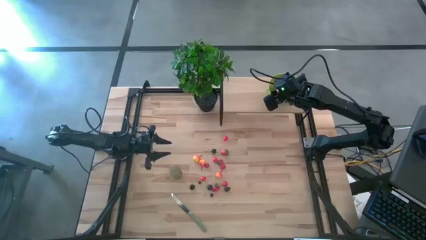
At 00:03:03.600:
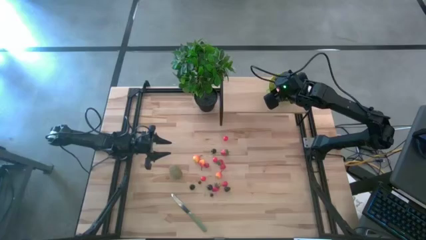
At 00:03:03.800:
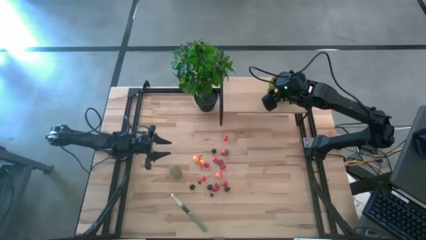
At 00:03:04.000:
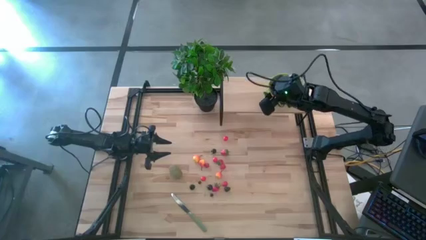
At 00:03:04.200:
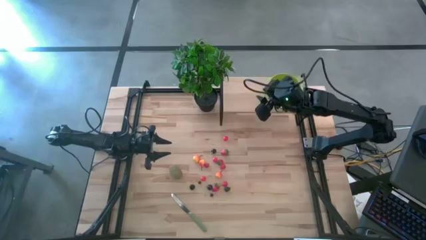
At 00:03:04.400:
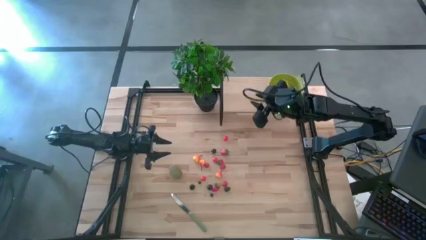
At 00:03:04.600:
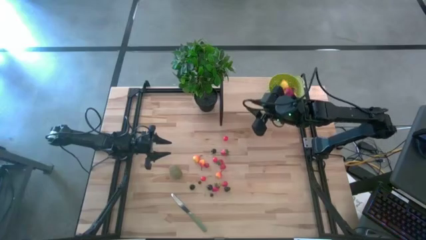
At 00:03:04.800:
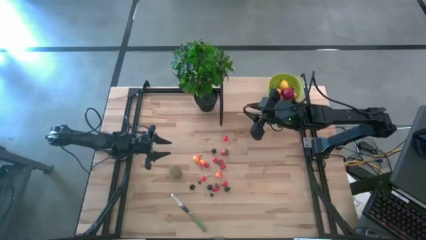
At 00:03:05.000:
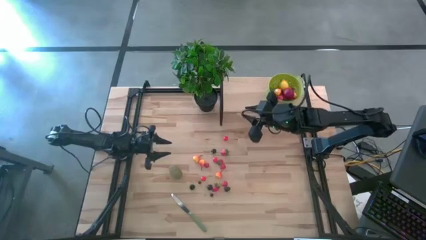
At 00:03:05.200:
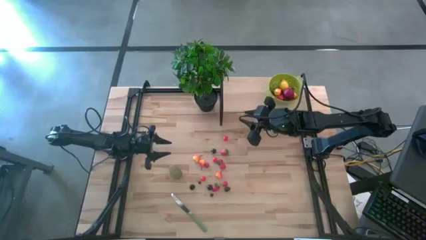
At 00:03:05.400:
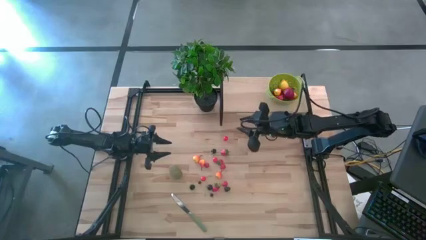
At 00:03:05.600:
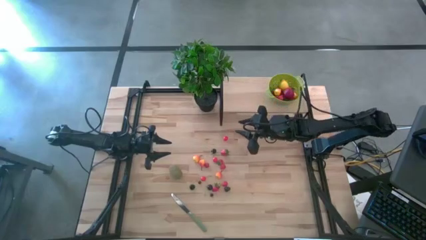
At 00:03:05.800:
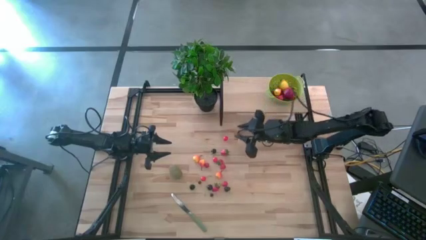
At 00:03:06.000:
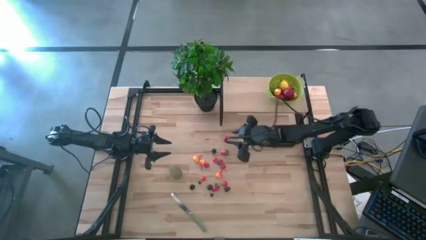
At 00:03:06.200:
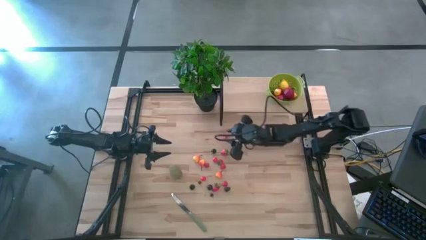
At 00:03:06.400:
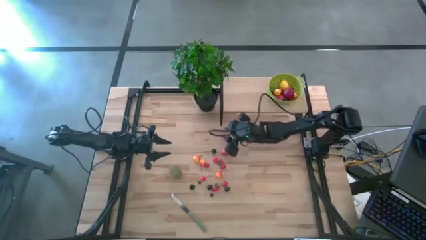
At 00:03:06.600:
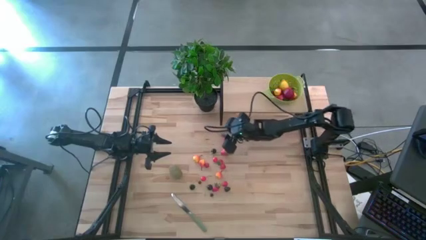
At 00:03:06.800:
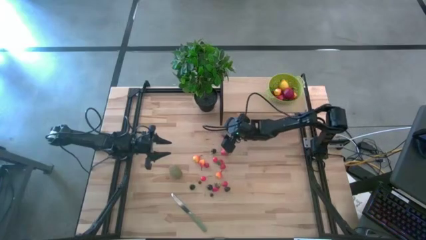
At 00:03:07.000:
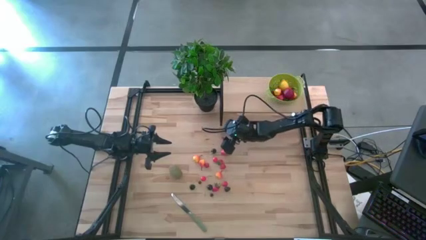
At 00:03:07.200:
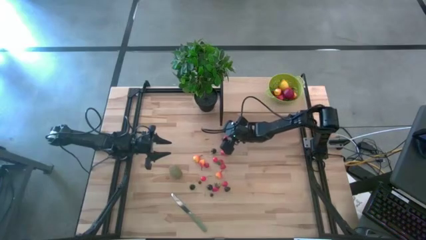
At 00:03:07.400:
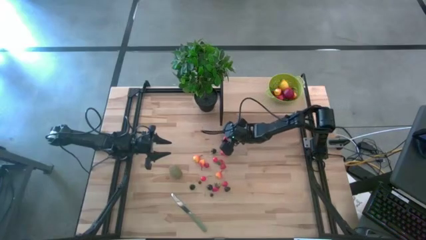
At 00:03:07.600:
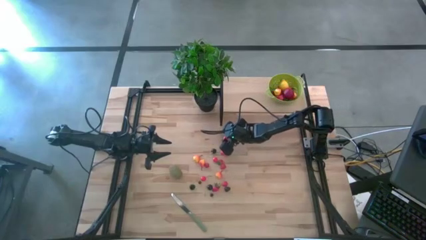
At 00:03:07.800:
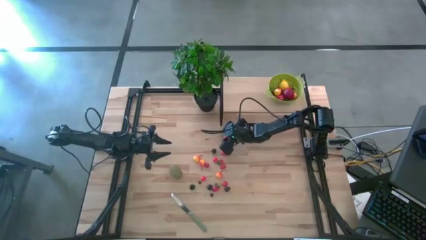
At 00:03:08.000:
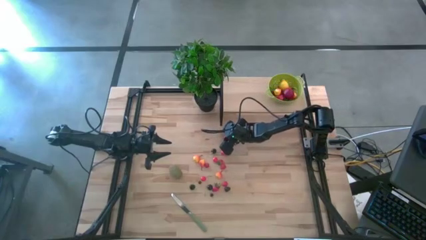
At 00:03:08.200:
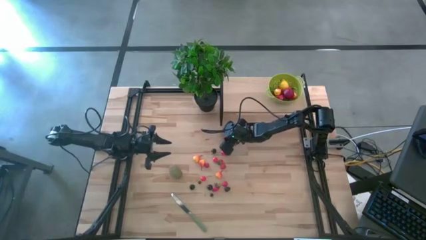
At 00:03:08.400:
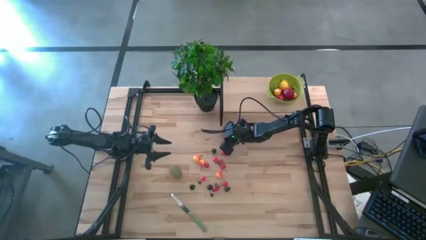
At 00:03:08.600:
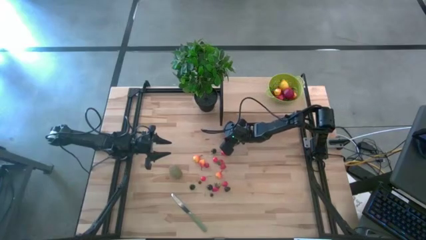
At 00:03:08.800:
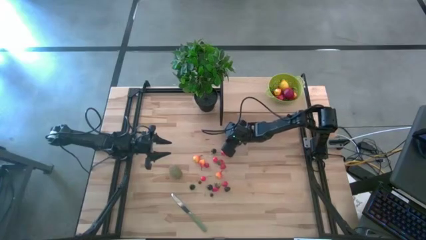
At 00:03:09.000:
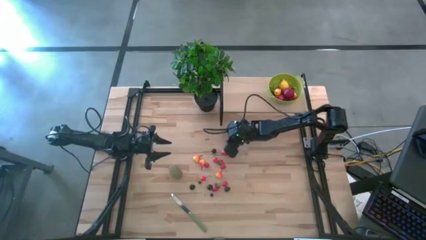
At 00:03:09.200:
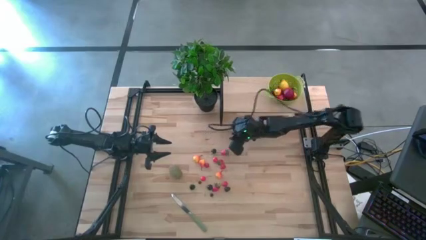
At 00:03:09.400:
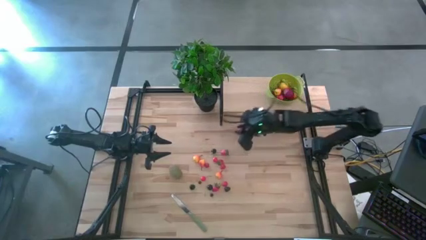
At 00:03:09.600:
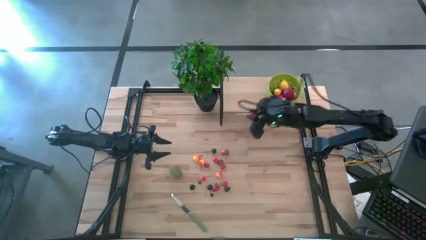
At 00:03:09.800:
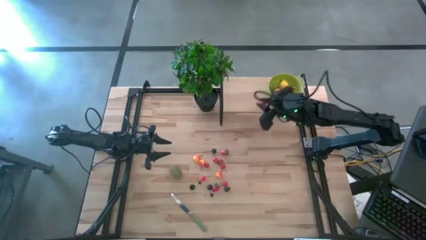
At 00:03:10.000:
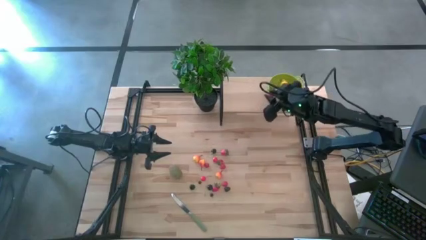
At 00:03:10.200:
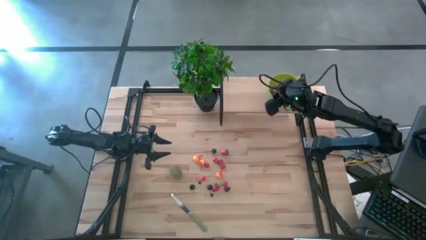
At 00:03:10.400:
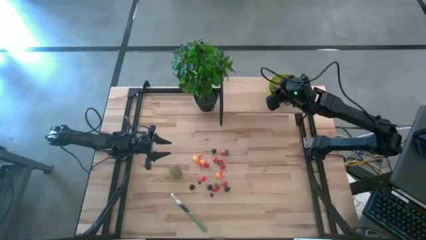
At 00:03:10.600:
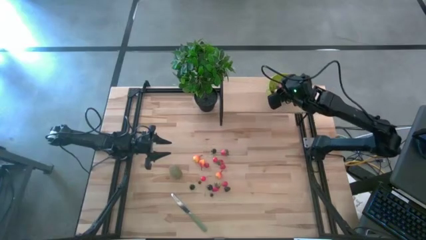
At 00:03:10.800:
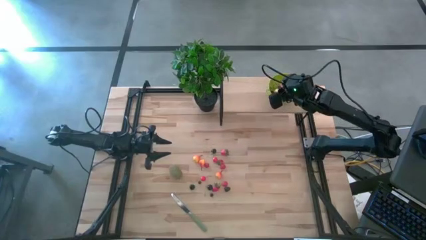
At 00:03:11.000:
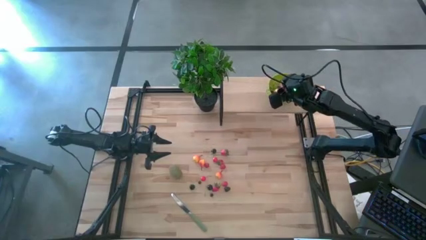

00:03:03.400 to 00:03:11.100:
Task: Pick & Place Fruit
Put the red cherry into the green strainer bowl on the shelf

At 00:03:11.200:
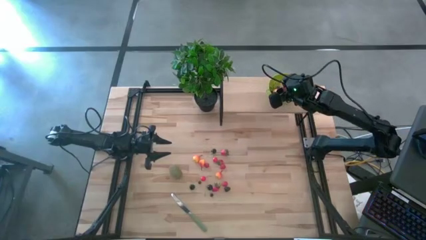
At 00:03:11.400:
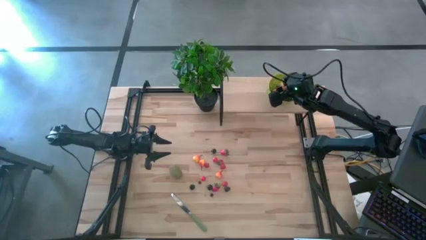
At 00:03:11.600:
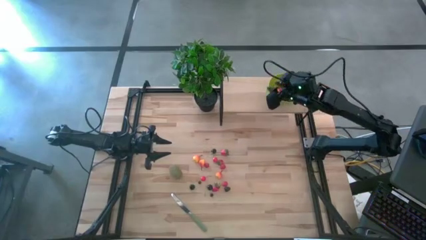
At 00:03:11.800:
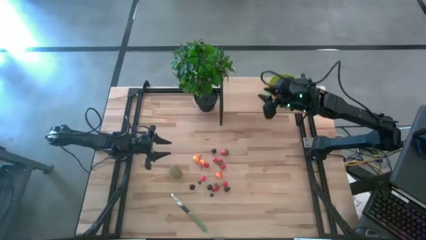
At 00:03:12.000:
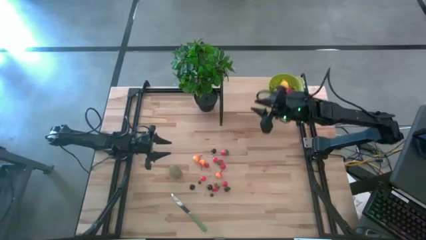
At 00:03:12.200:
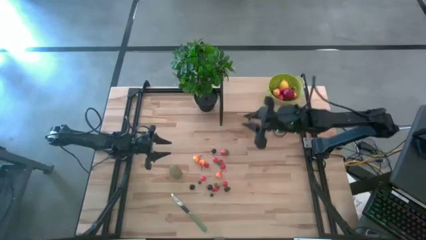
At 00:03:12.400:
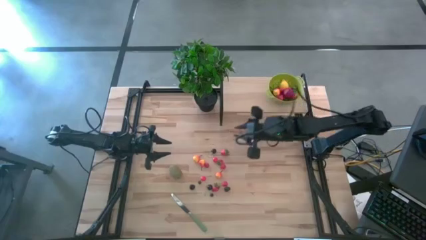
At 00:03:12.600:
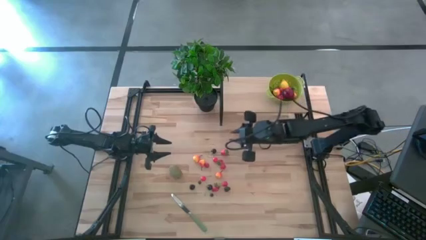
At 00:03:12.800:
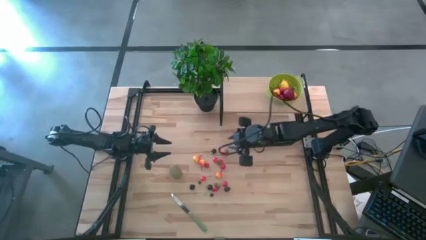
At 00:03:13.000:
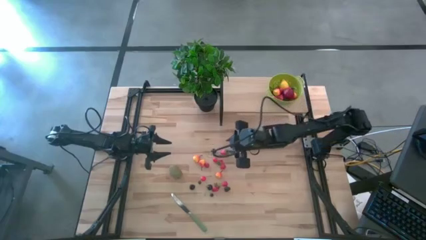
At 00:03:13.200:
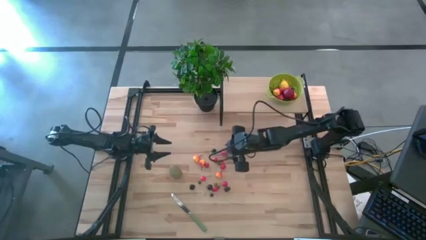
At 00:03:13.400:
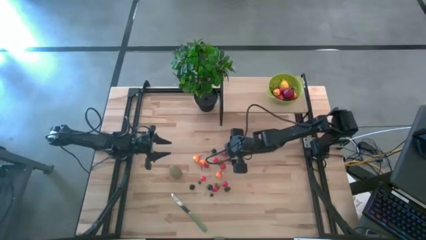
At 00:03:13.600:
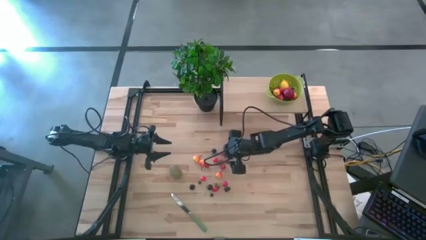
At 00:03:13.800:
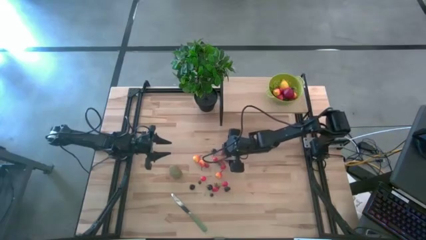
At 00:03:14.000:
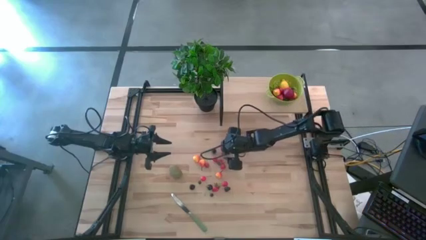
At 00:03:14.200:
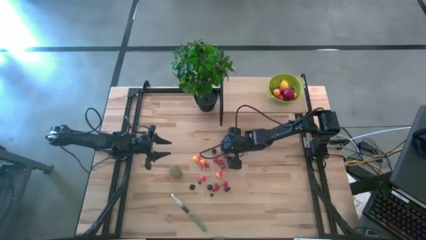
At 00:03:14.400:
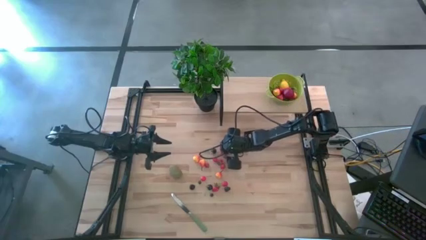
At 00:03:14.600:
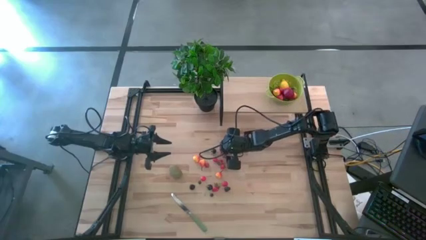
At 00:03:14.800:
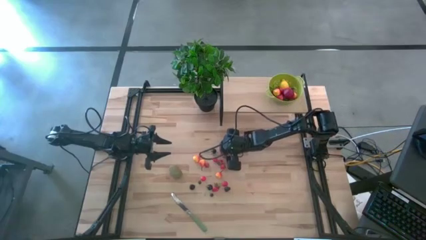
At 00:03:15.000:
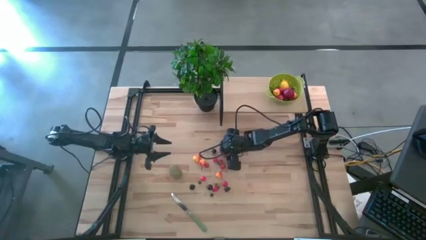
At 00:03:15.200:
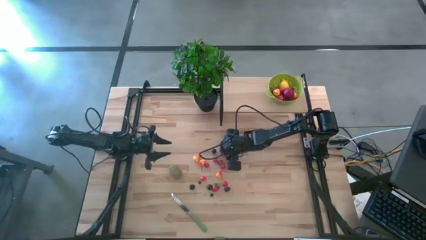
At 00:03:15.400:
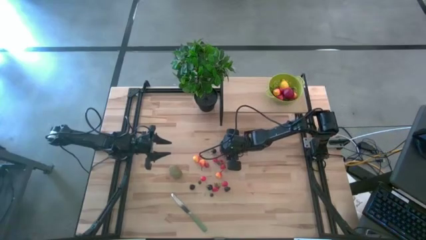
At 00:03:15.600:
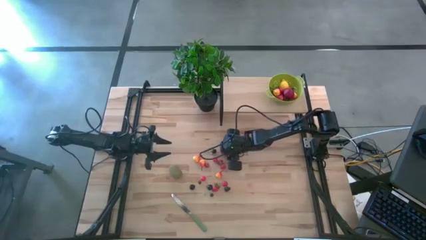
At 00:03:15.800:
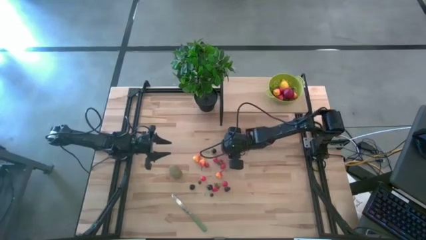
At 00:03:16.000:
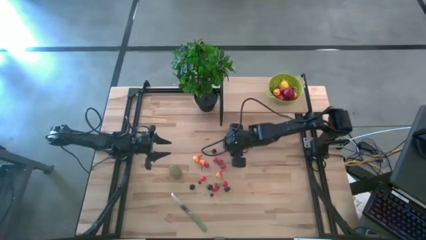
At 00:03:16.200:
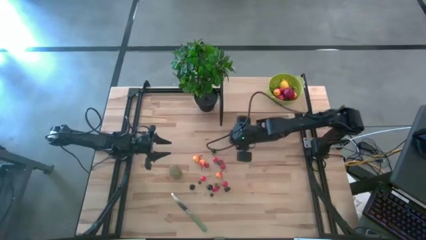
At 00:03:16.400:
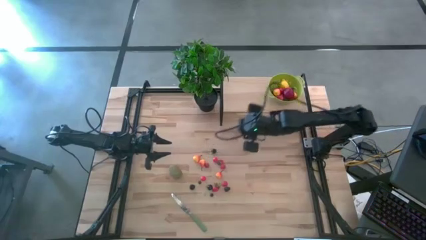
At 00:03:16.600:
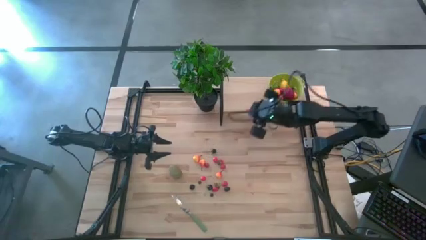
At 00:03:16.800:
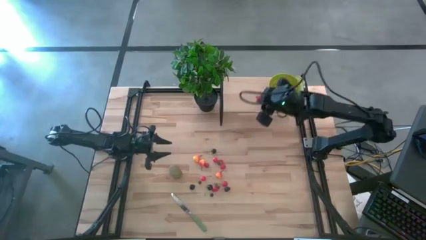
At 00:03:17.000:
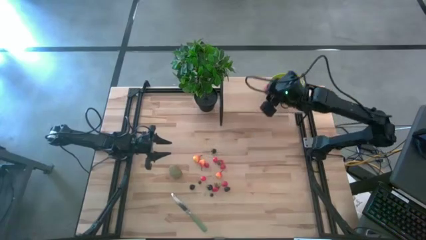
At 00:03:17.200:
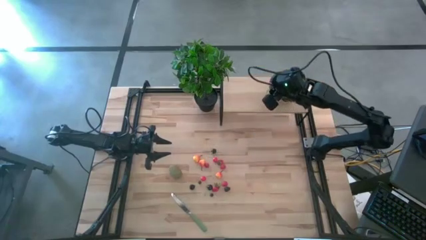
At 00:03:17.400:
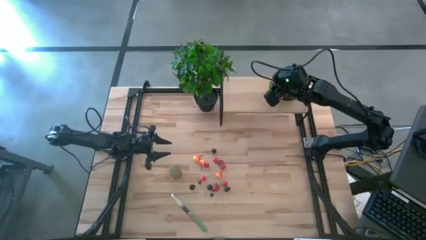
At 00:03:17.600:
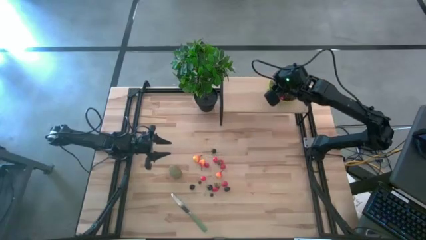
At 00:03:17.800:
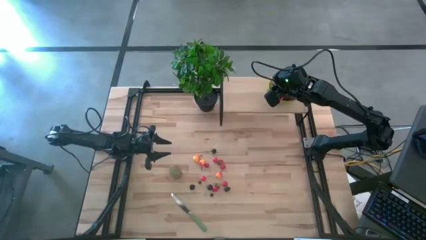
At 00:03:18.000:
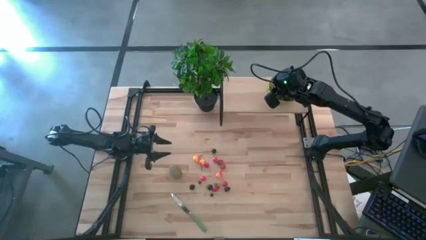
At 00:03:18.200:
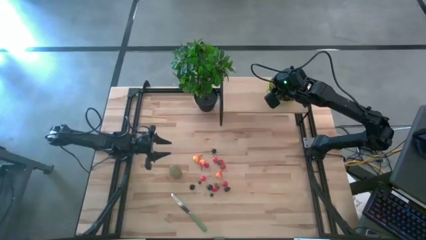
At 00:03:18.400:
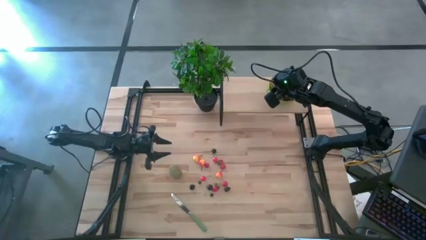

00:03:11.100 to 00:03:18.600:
Put the strawberry into the green strainer bowl on the shelf
